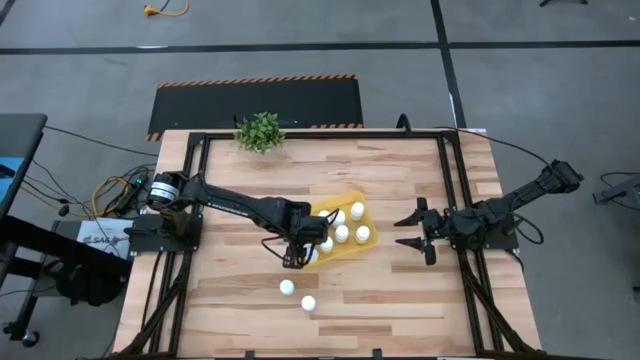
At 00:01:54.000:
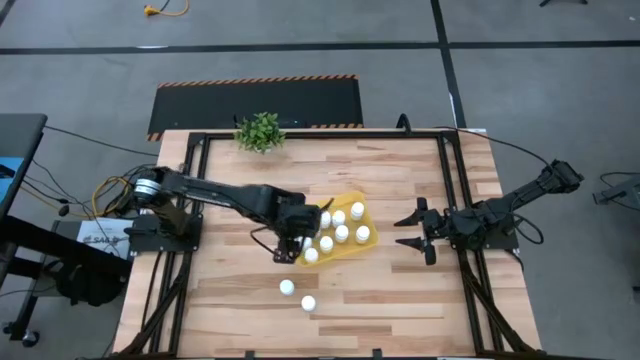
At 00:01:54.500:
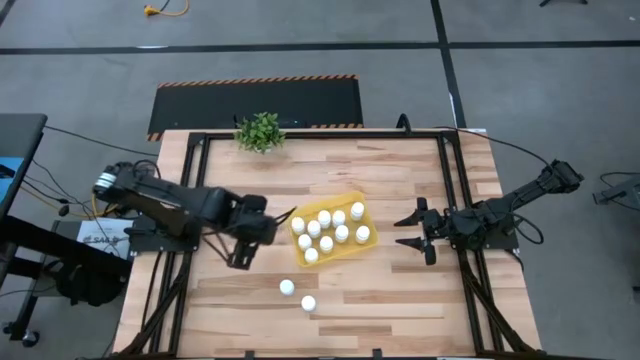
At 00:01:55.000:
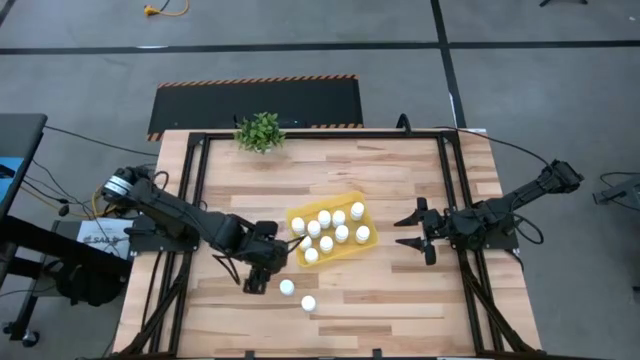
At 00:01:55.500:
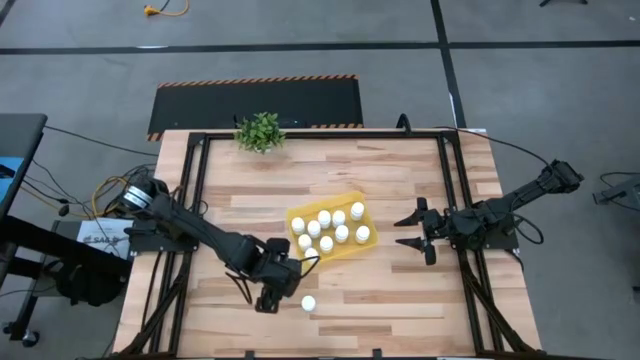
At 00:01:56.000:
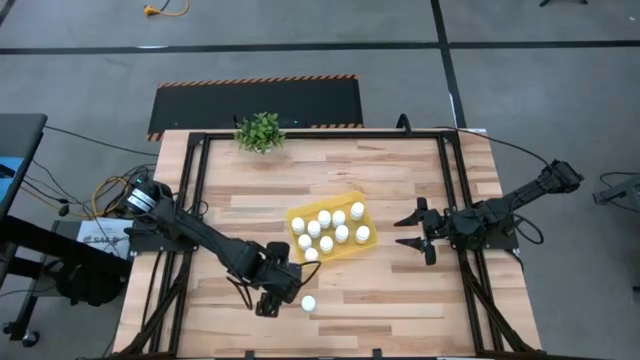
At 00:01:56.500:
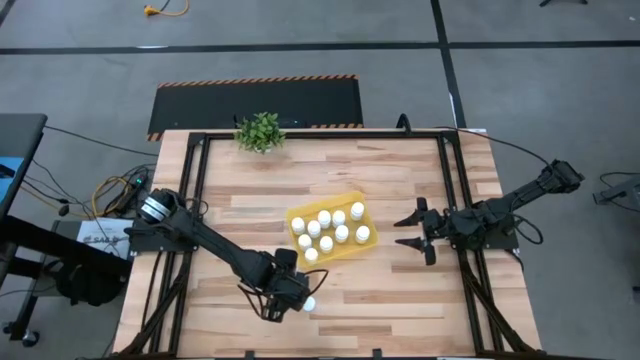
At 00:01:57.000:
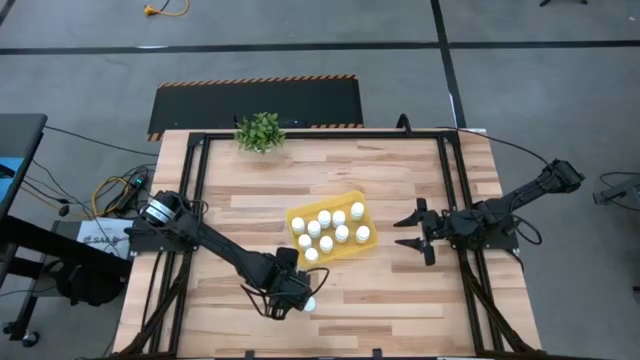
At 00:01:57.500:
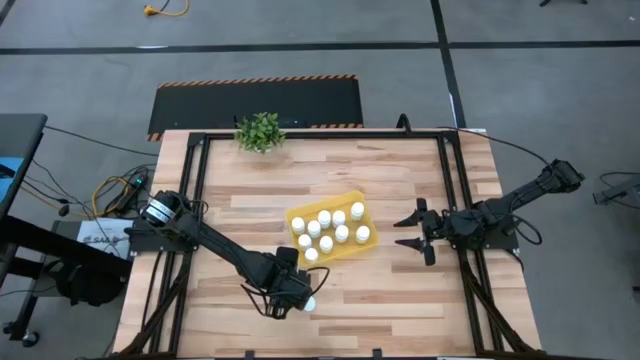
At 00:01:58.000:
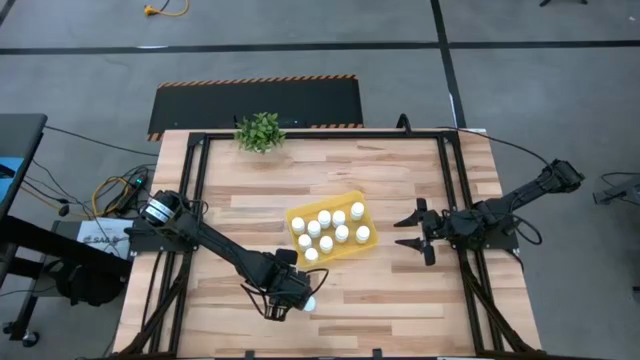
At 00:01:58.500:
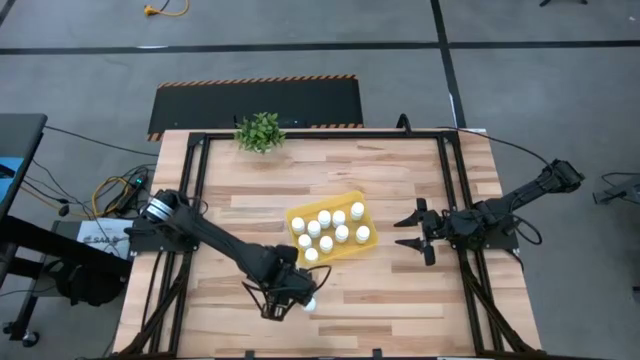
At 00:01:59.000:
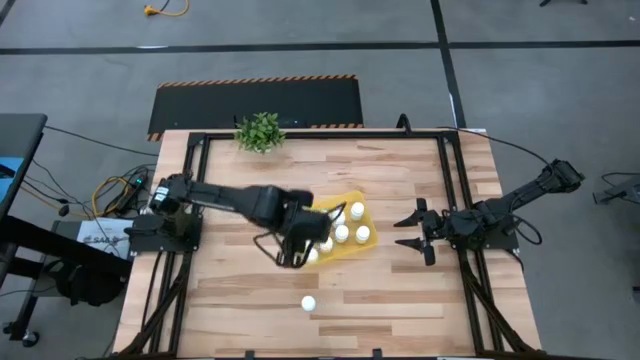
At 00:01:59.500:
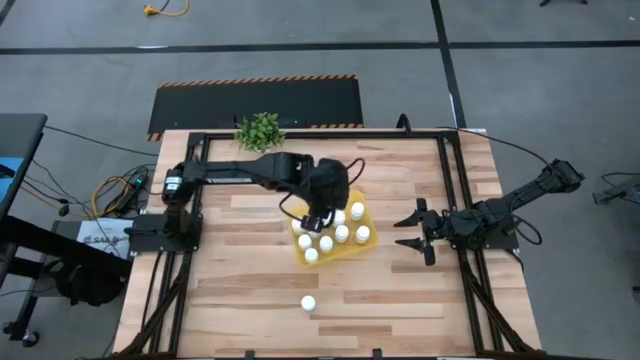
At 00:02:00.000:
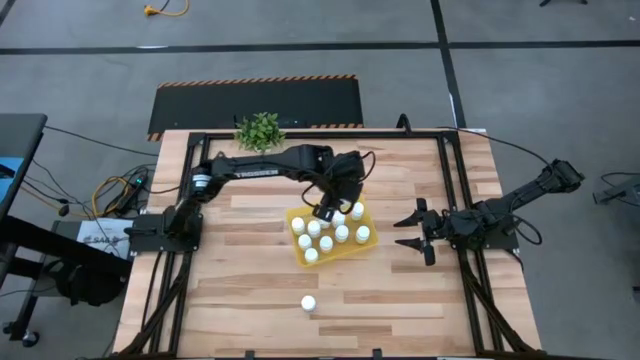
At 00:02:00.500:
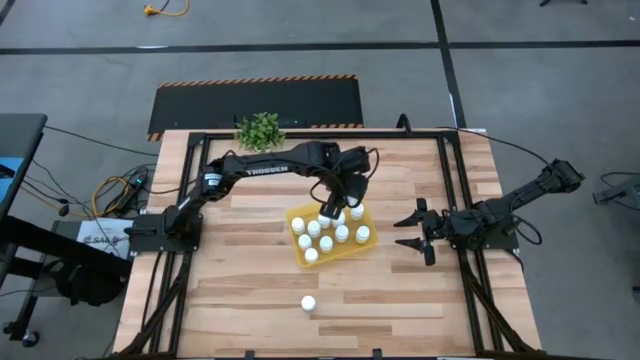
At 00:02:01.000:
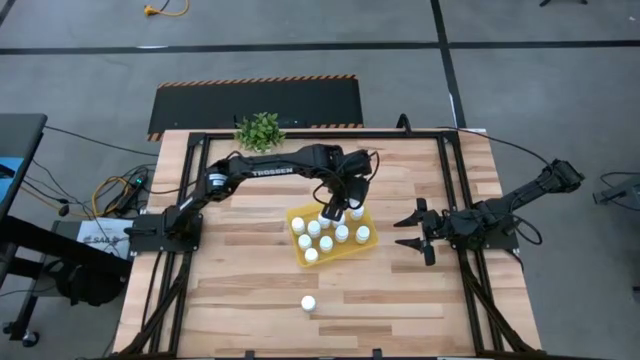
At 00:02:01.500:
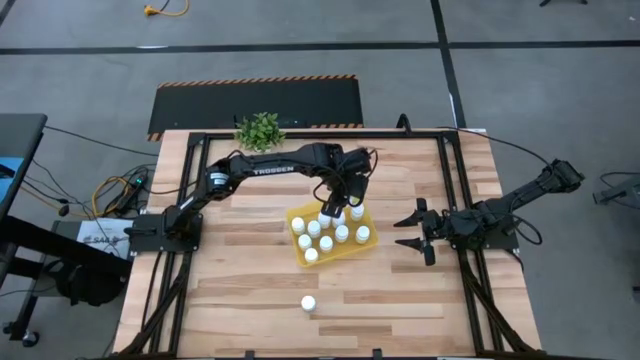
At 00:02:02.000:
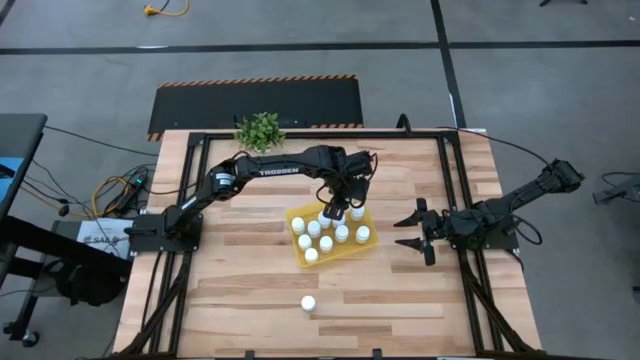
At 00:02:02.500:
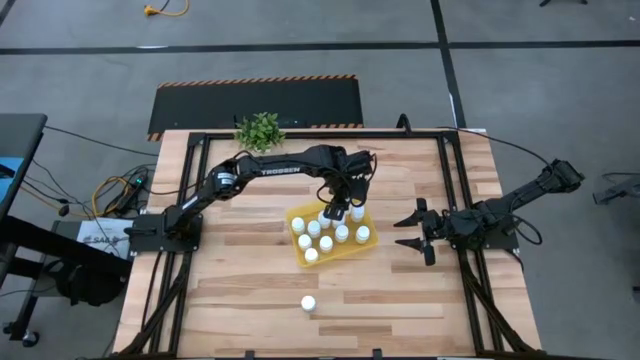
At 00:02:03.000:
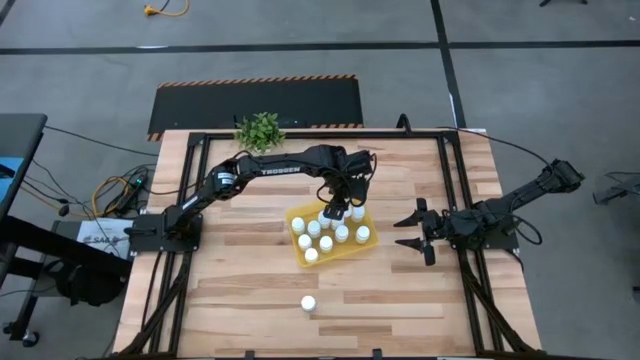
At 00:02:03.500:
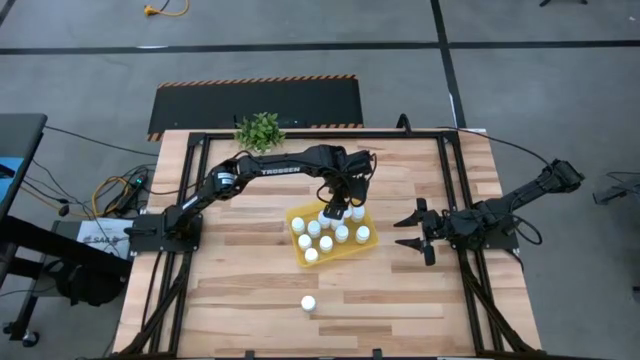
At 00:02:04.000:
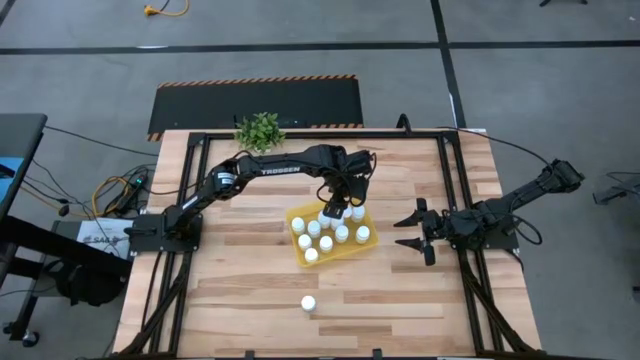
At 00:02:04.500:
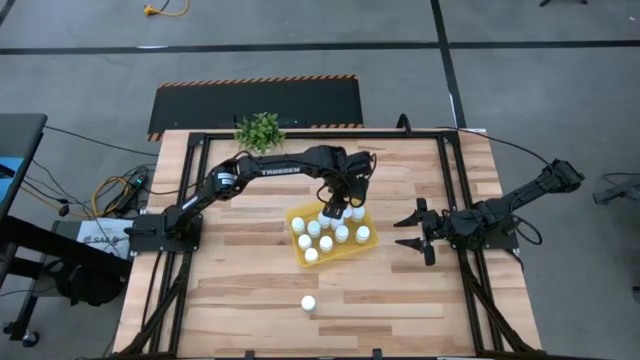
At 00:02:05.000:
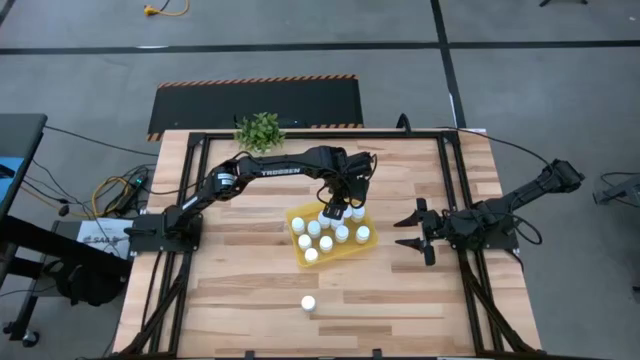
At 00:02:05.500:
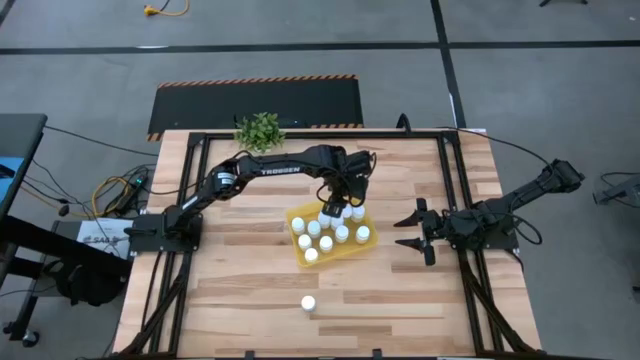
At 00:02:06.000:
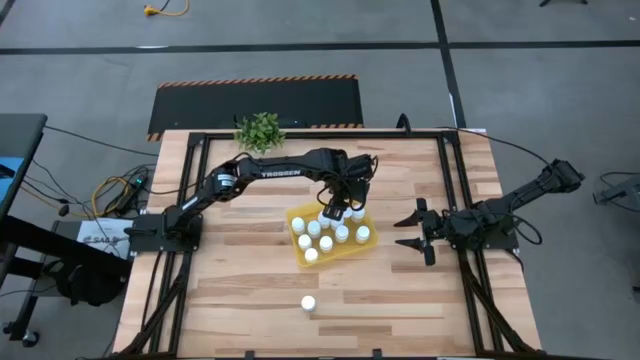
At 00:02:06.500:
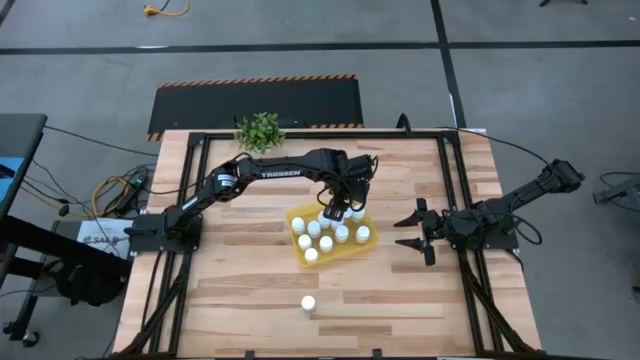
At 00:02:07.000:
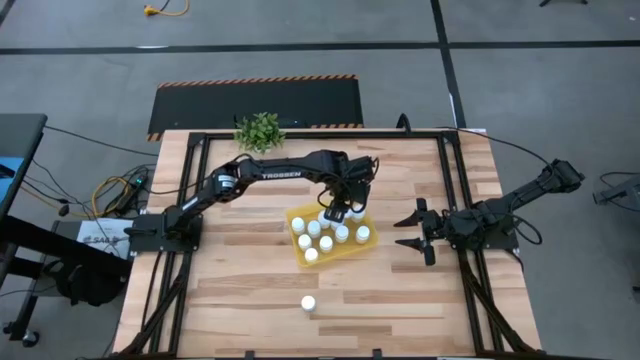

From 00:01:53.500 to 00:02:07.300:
Task: Pick and place pill bottles into a basket
Put the white pill bottle into the yellow bin

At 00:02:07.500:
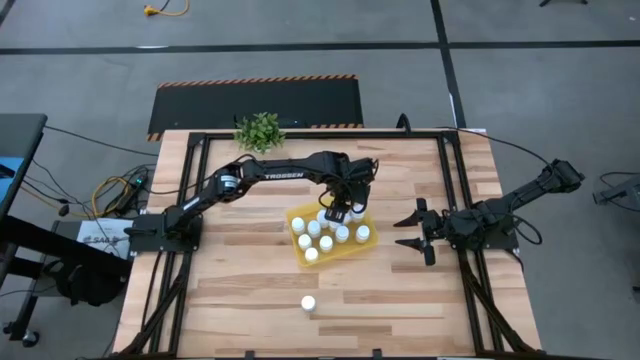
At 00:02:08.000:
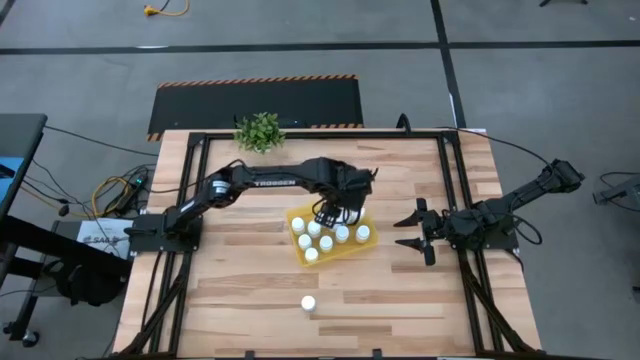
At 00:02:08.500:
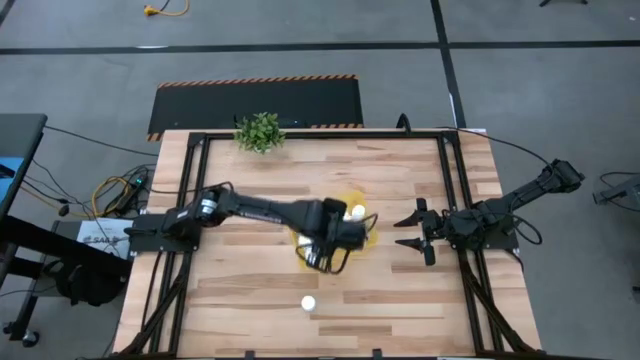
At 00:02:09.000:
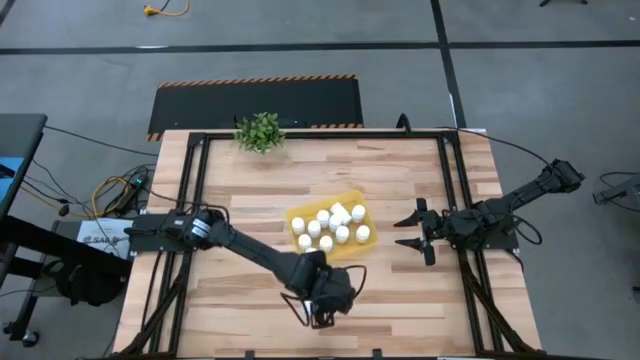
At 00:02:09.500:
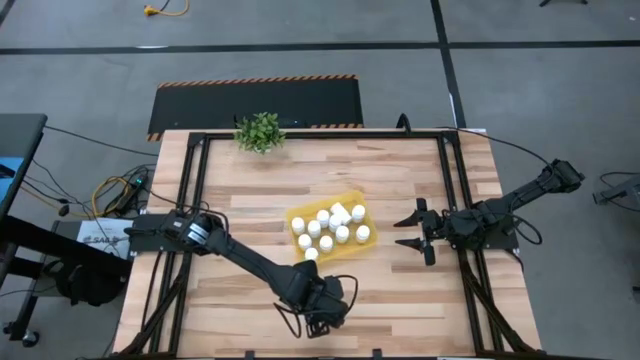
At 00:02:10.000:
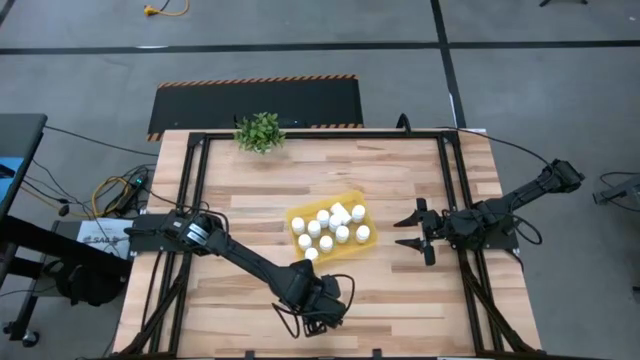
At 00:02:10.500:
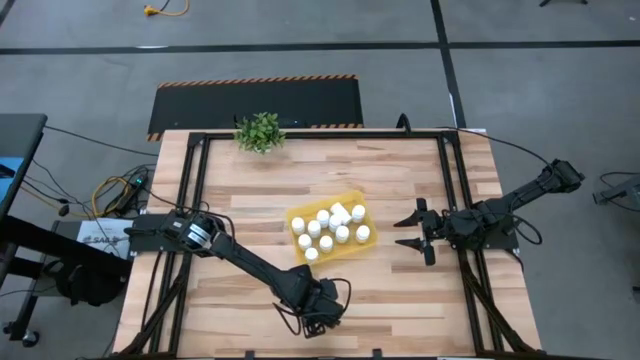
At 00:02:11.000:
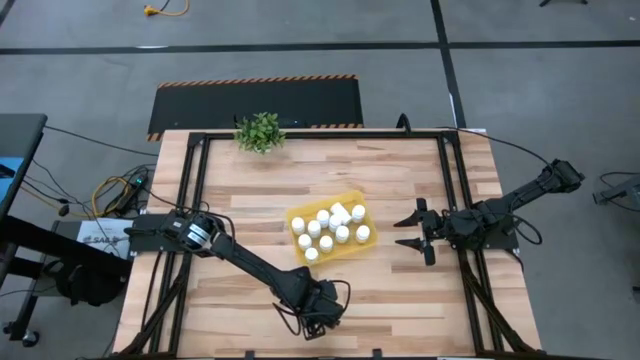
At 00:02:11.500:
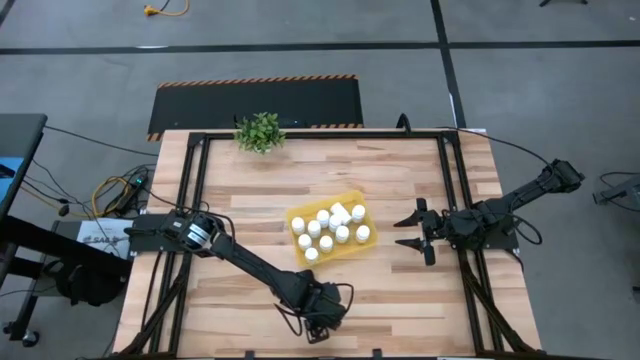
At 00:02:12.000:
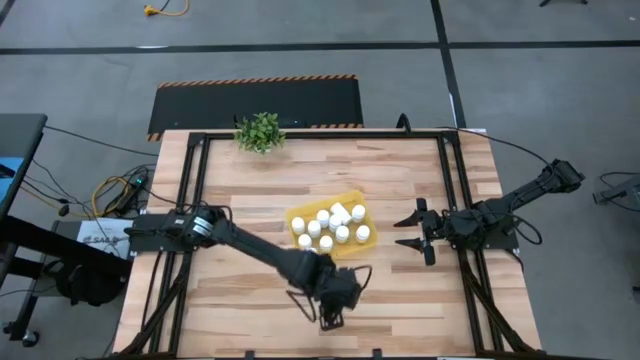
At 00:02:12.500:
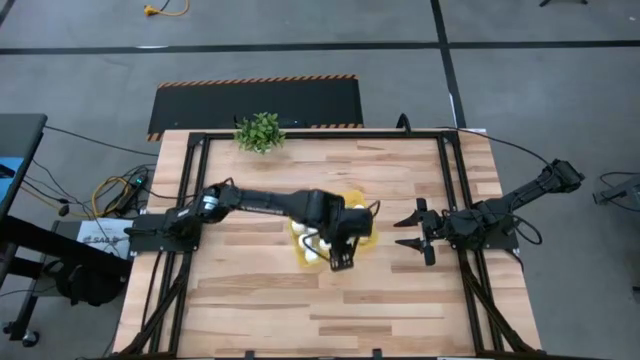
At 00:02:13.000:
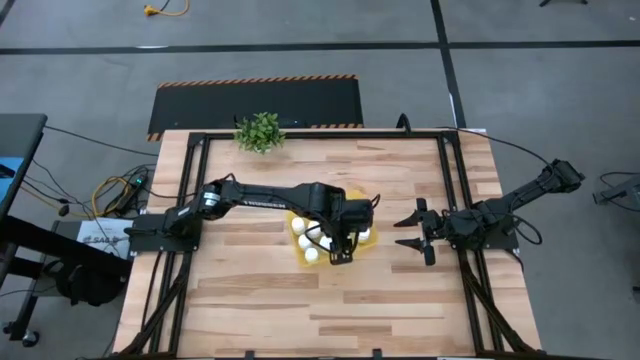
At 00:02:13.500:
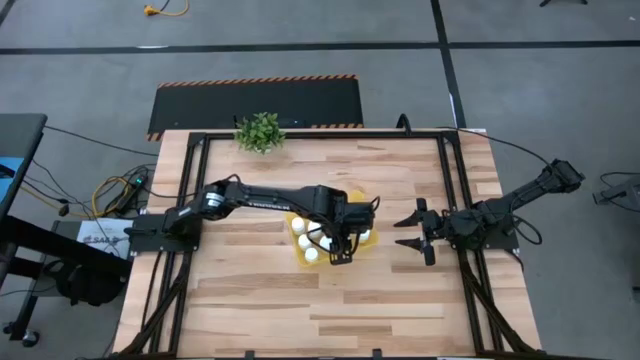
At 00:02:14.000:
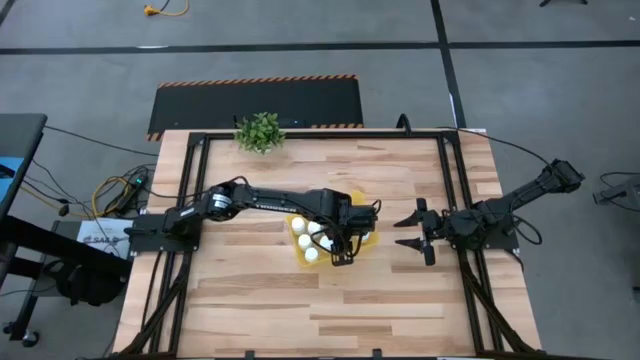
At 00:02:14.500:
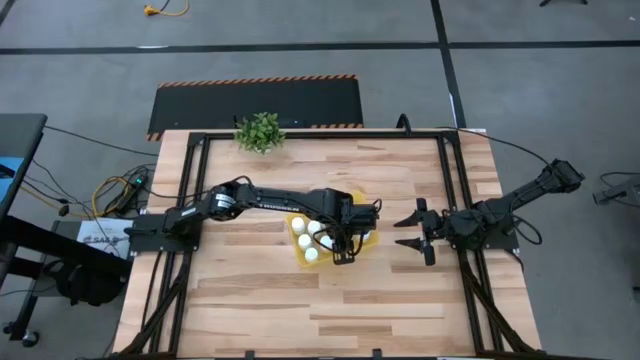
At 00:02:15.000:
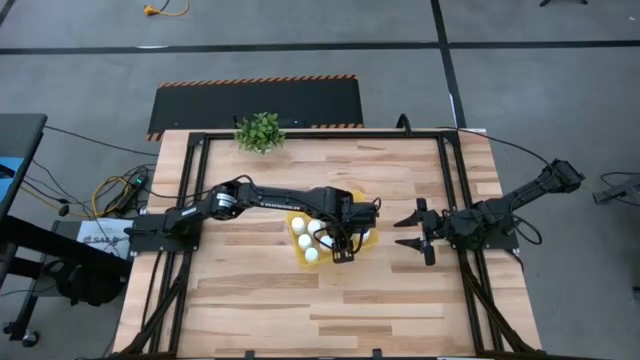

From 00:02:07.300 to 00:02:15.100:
Put the white pill bottle into the yellow bin
